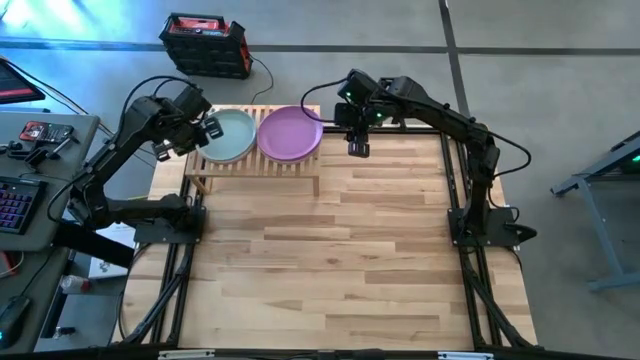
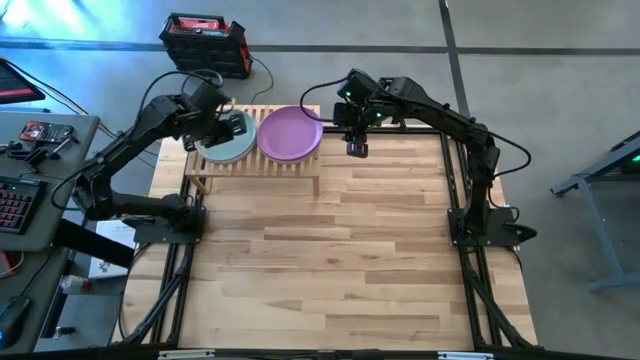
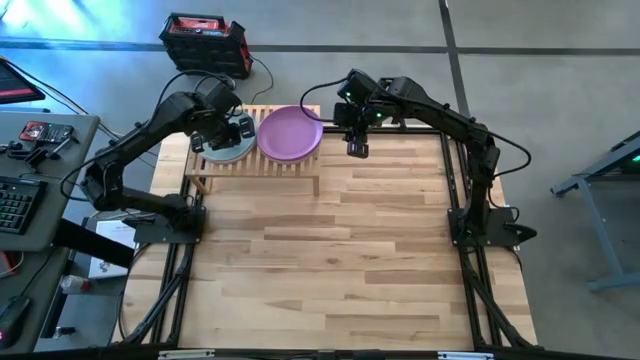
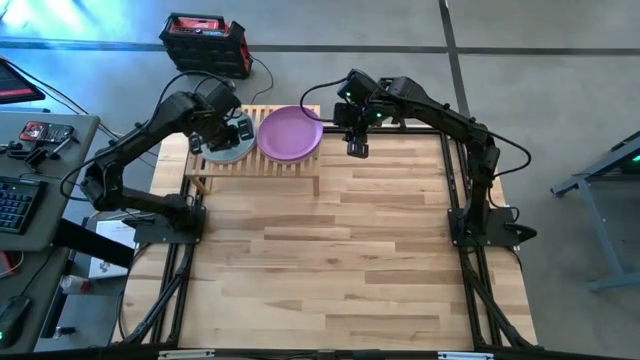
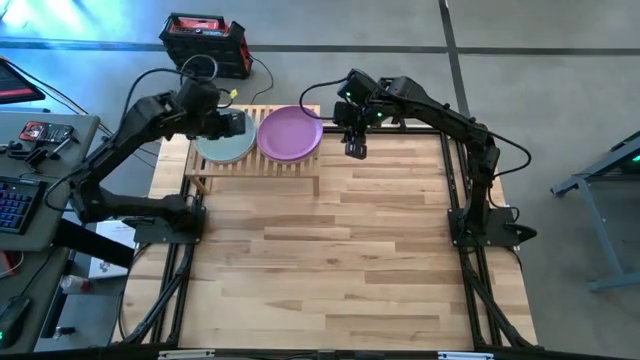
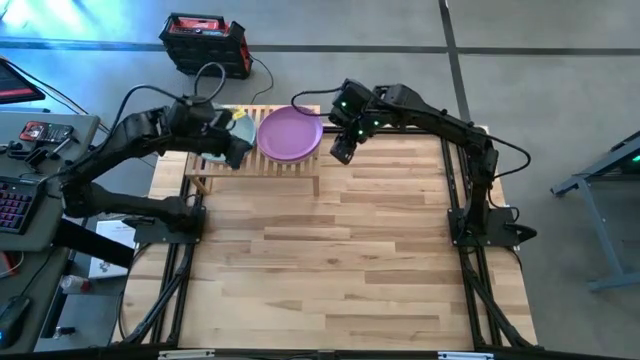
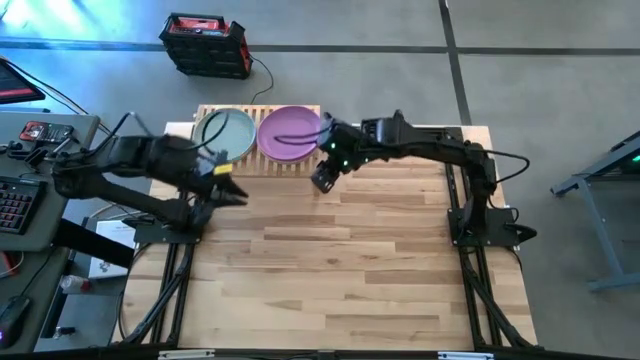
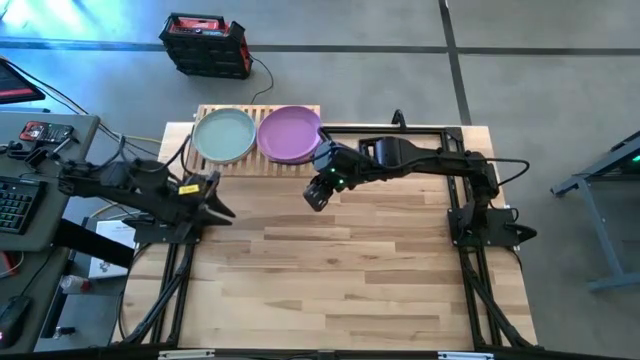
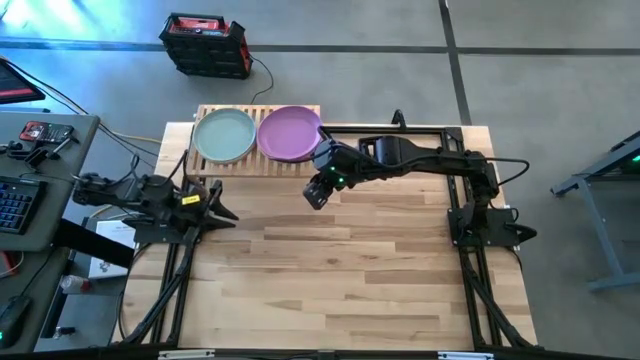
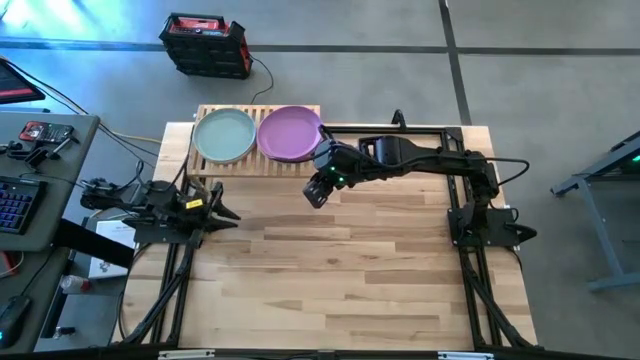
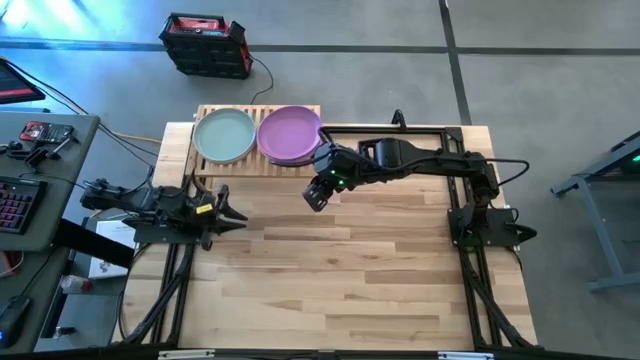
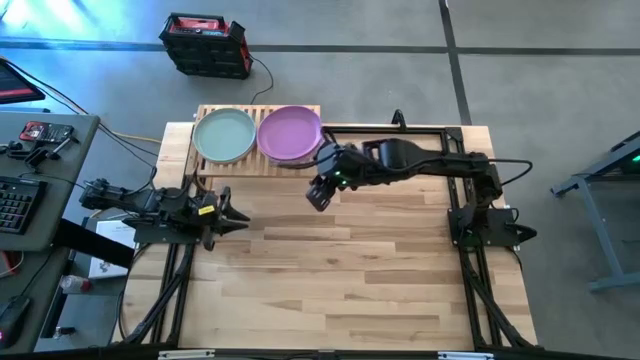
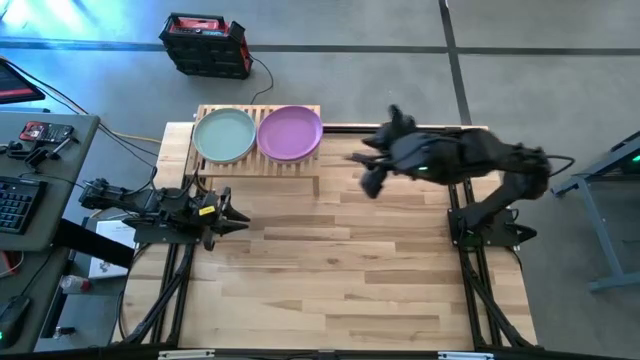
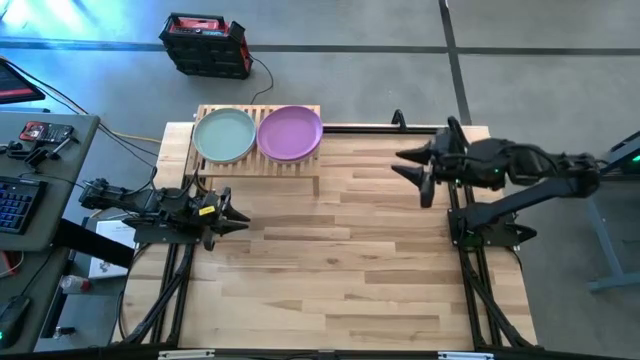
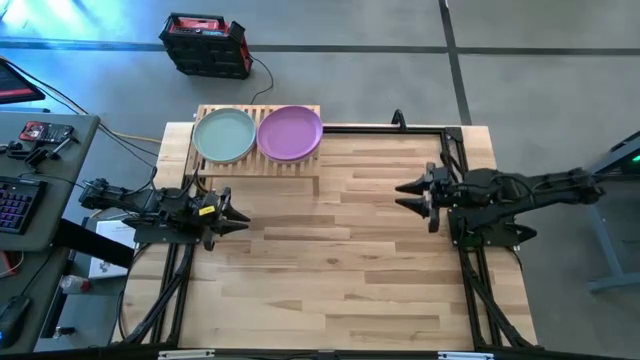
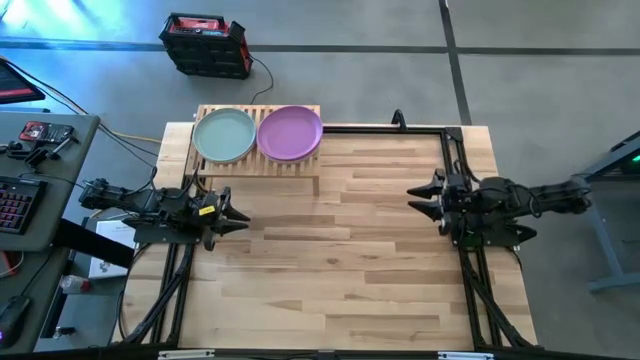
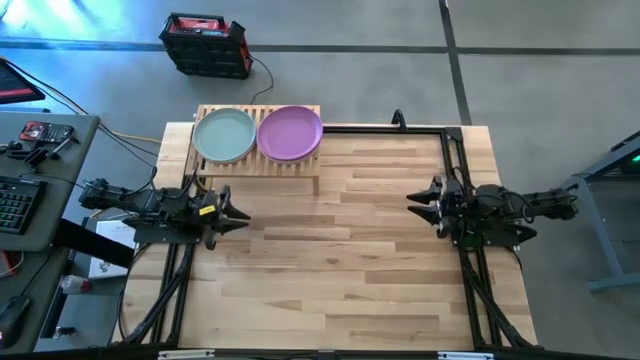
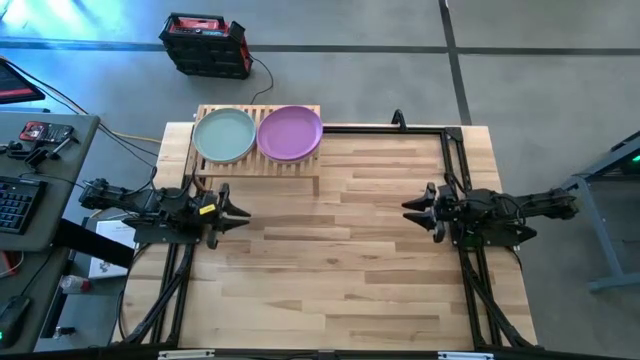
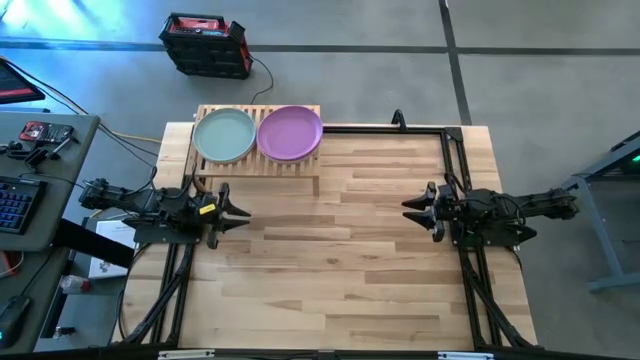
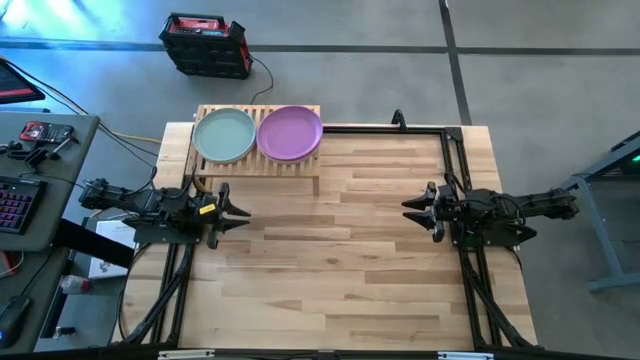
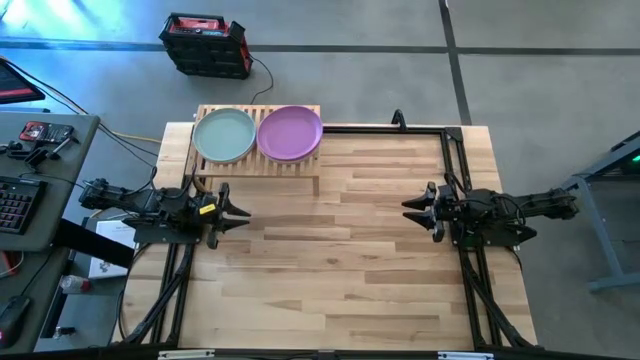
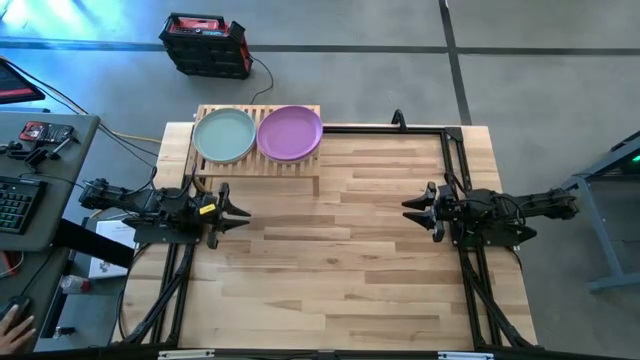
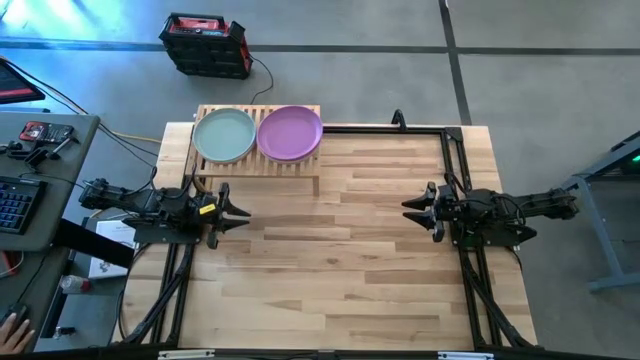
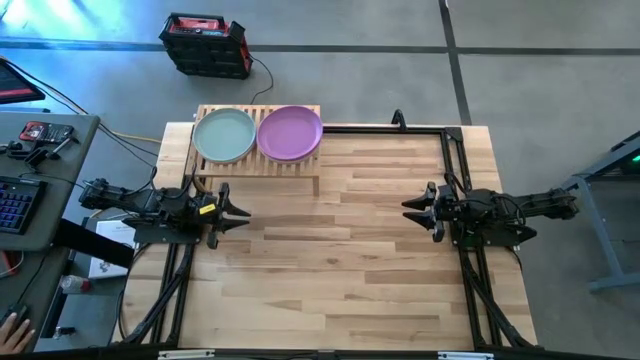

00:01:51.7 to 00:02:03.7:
Task: Place and stack plates onto a shelf
Return to Home Position

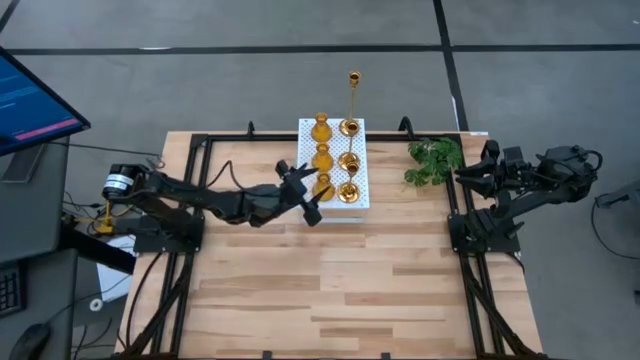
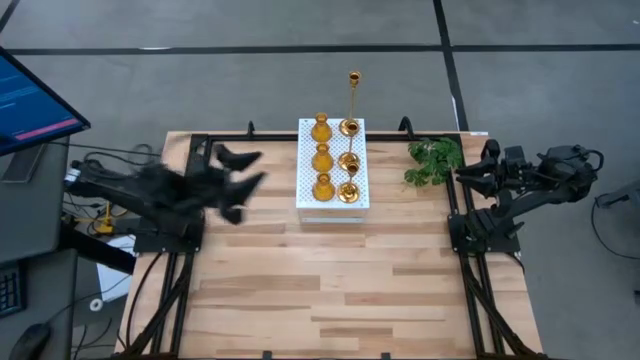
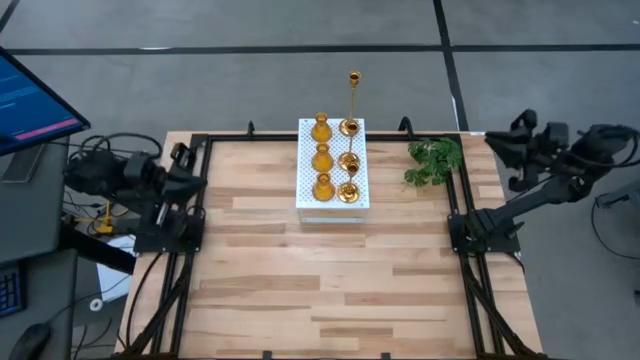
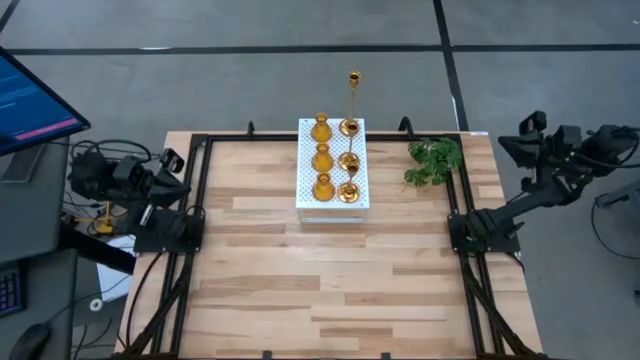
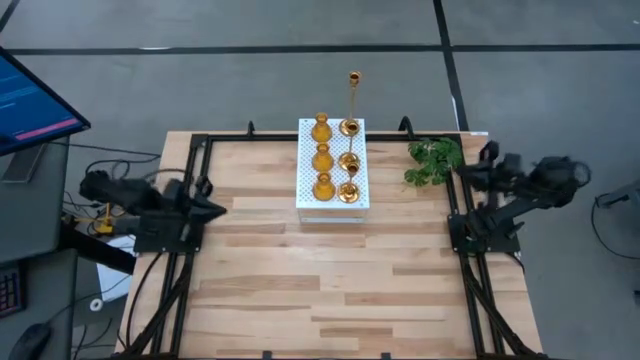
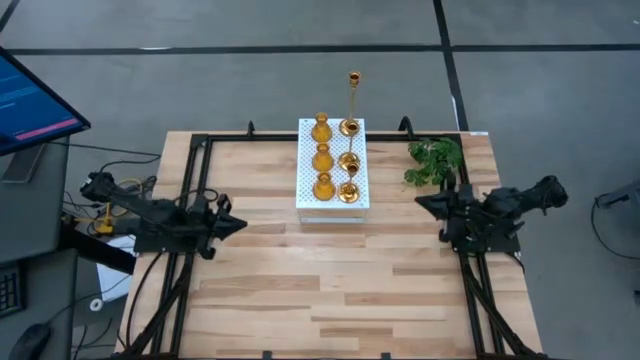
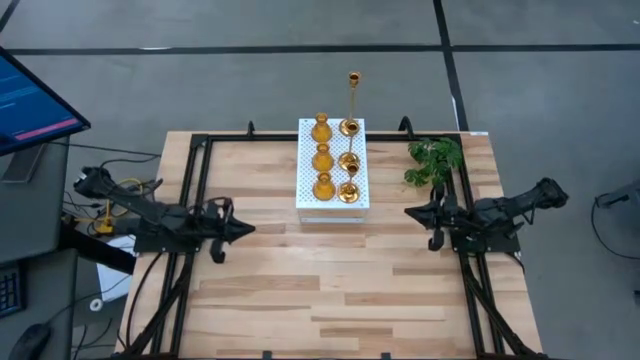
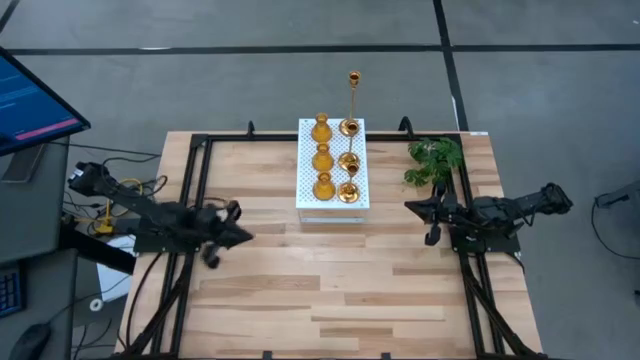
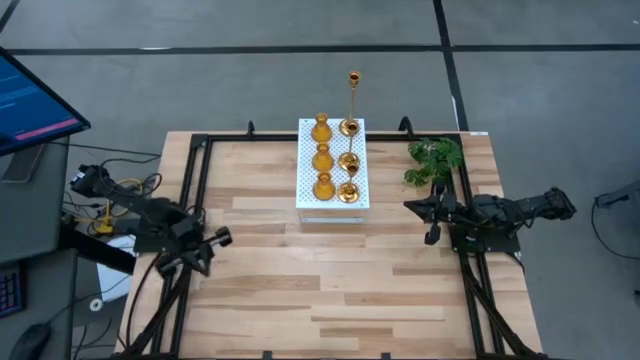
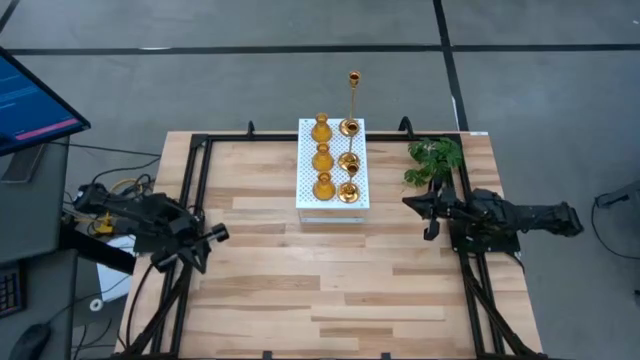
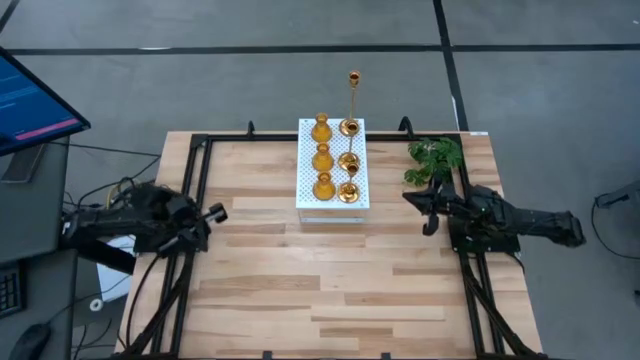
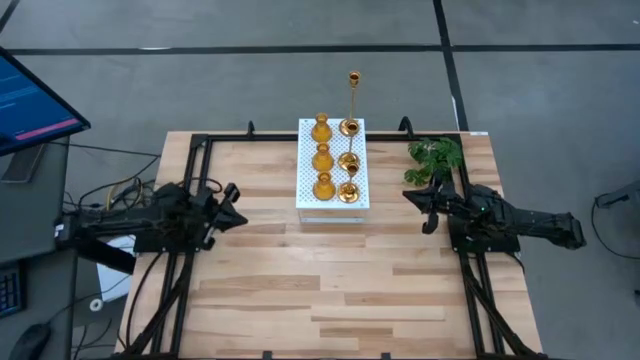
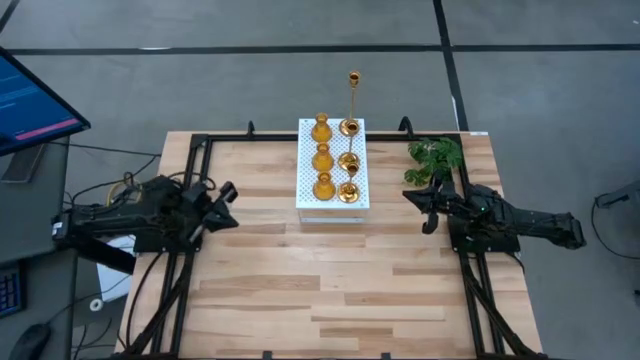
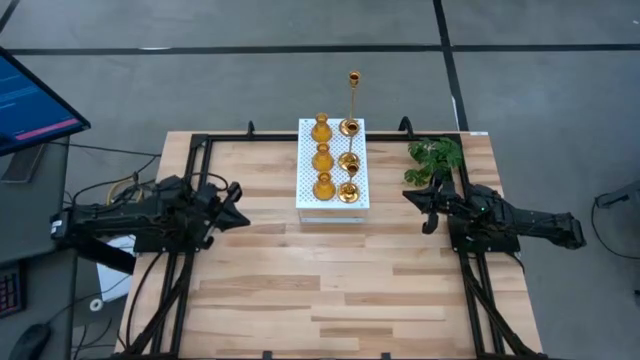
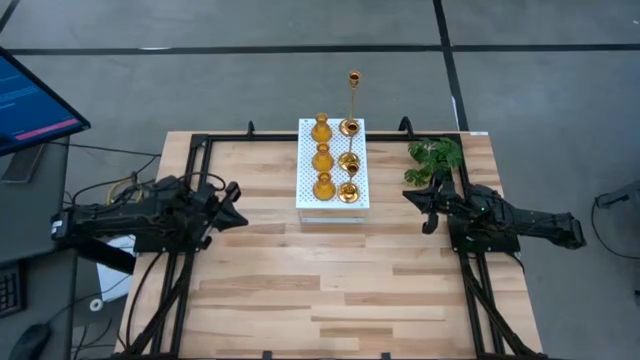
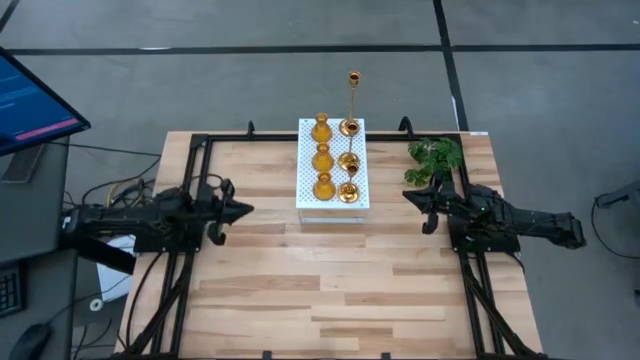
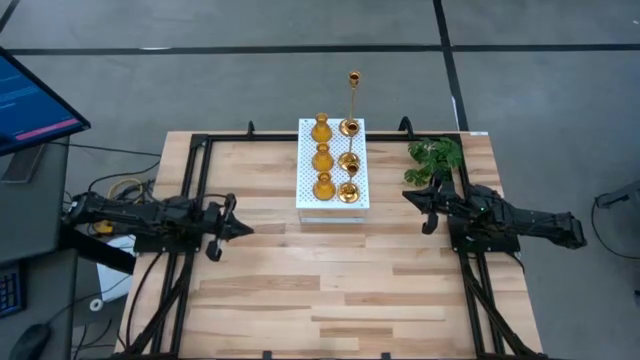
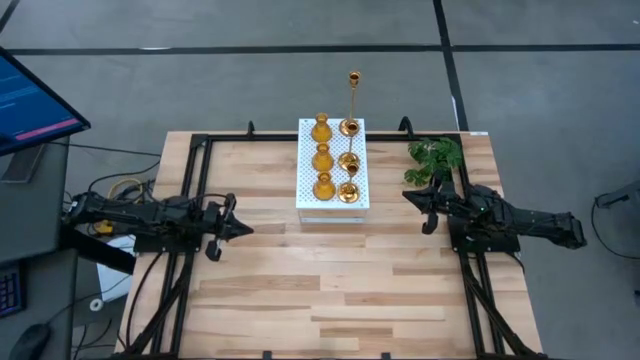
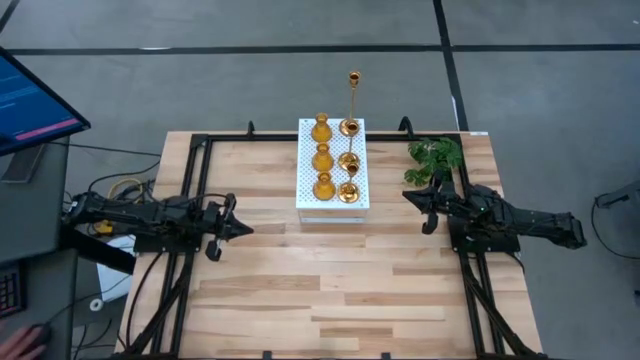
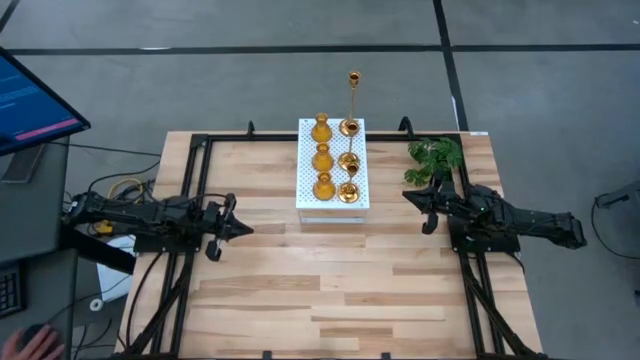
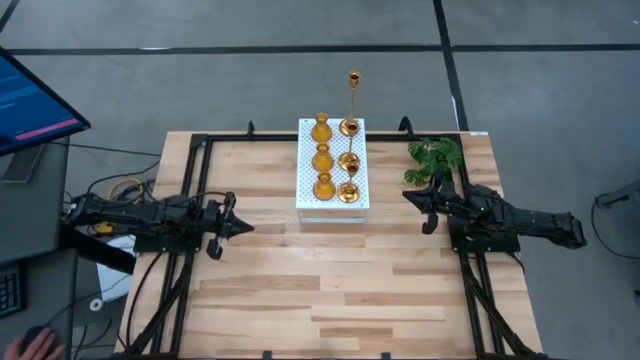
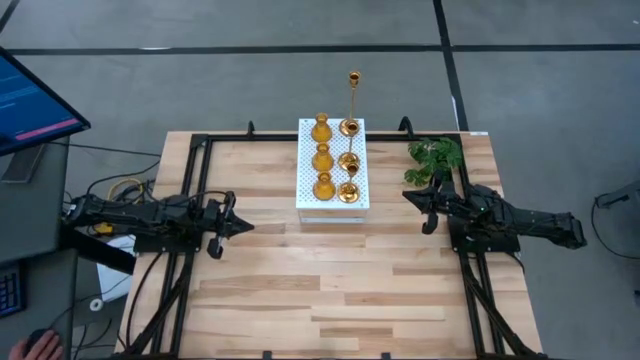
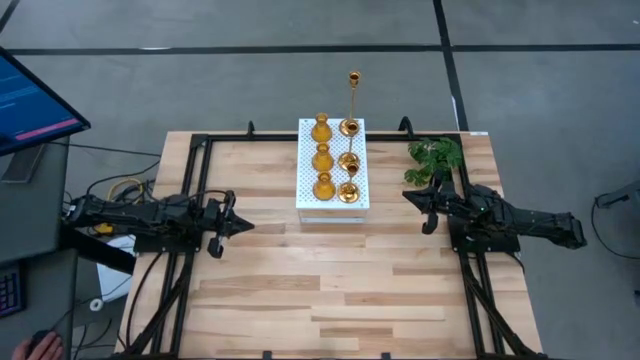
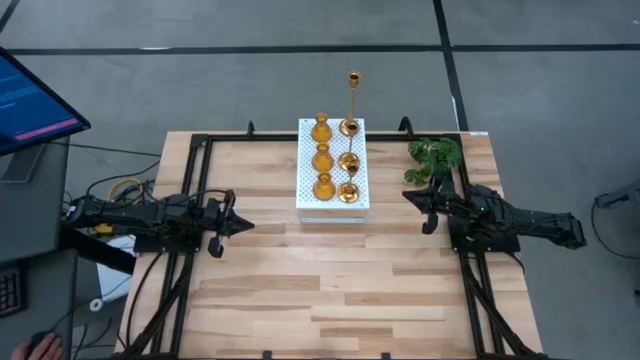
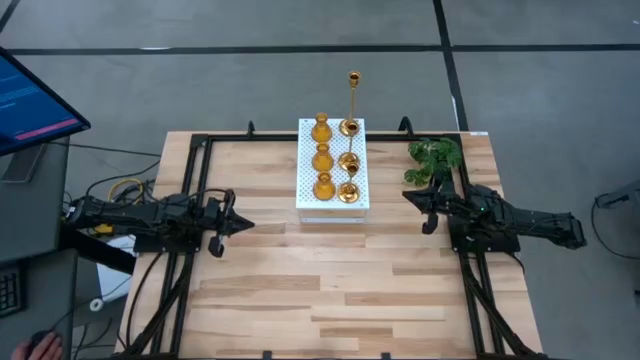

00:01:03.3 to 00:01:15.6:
Task: Pick & Place candle stick holders
Return to Home Position
